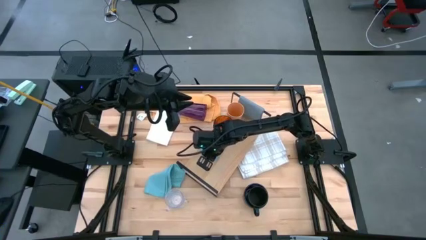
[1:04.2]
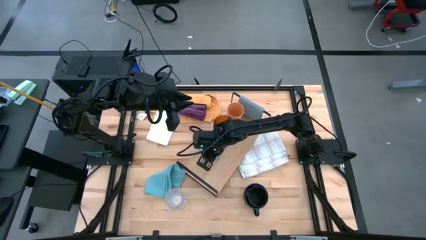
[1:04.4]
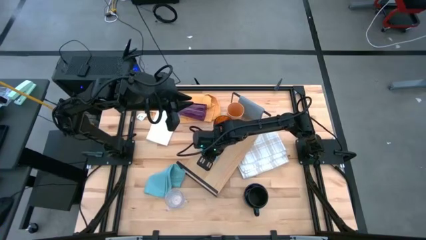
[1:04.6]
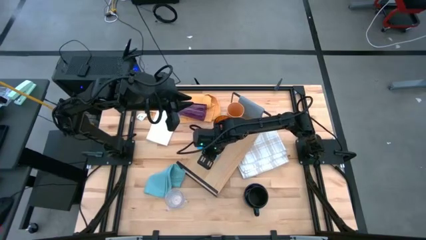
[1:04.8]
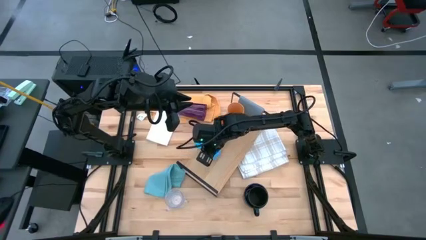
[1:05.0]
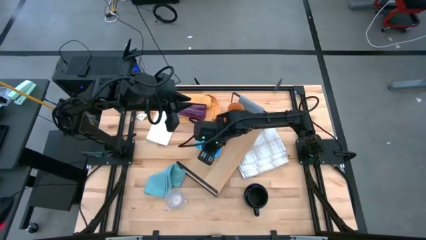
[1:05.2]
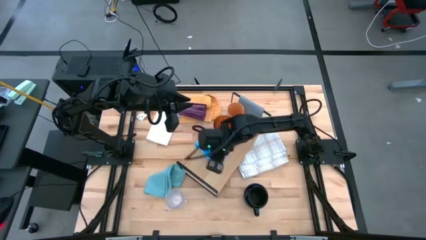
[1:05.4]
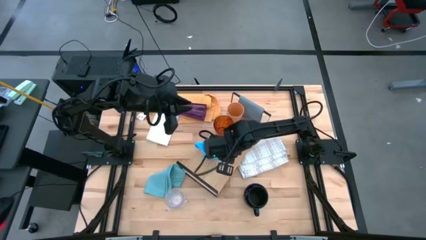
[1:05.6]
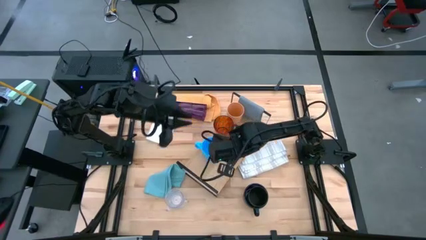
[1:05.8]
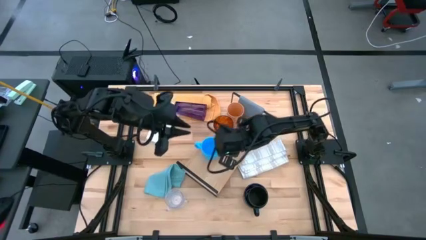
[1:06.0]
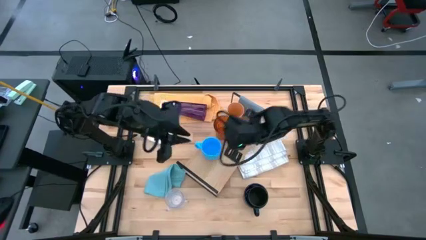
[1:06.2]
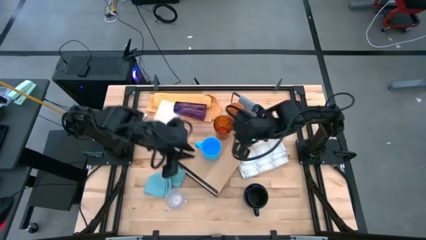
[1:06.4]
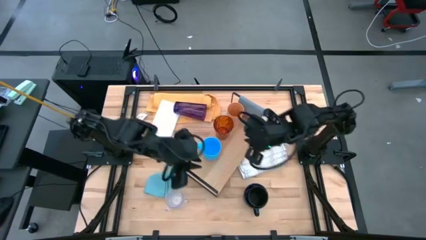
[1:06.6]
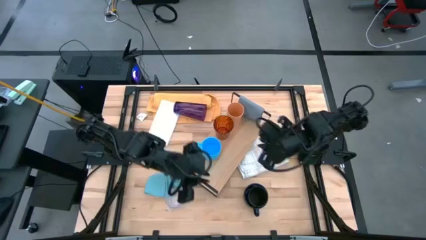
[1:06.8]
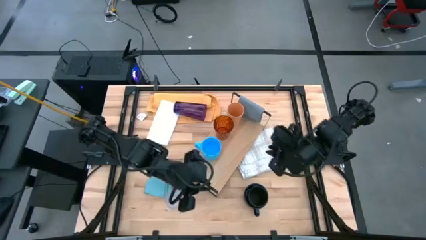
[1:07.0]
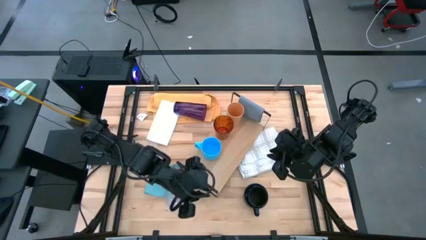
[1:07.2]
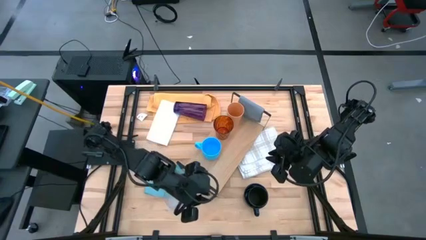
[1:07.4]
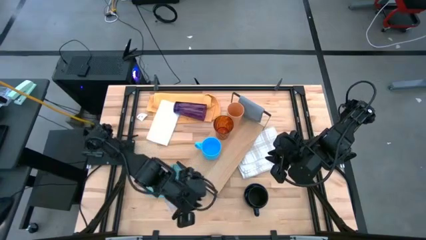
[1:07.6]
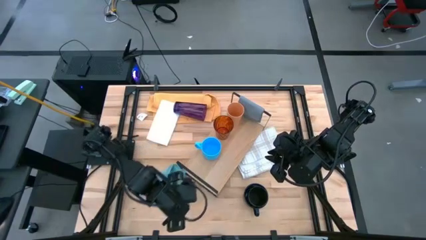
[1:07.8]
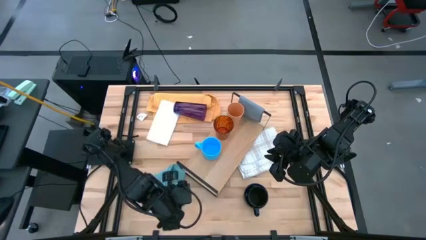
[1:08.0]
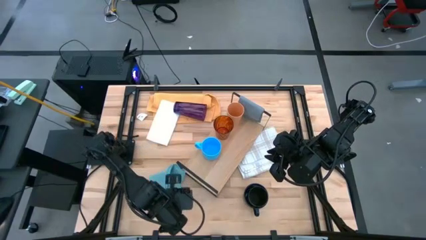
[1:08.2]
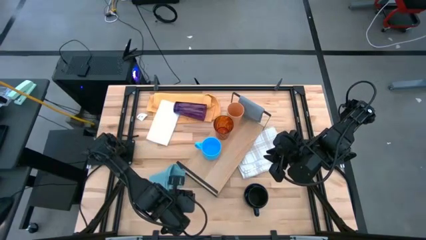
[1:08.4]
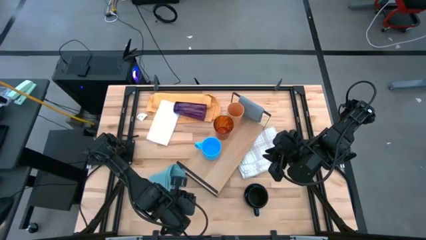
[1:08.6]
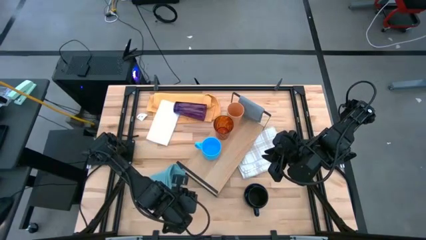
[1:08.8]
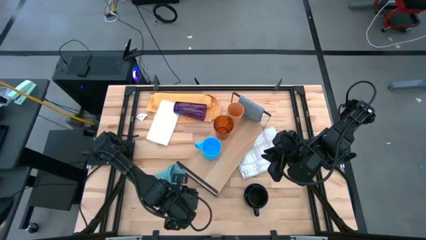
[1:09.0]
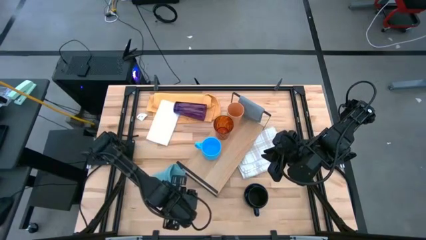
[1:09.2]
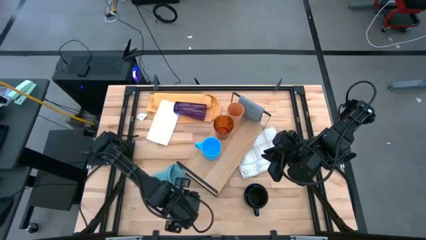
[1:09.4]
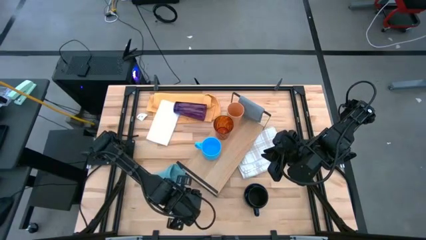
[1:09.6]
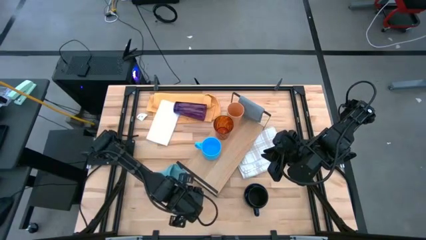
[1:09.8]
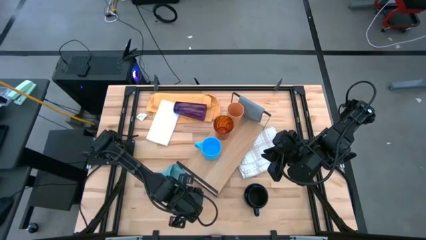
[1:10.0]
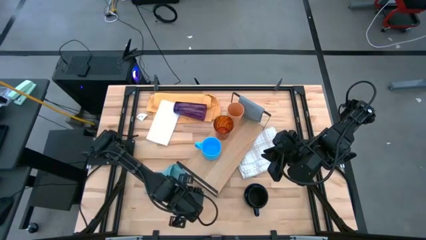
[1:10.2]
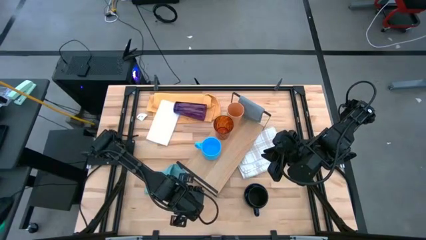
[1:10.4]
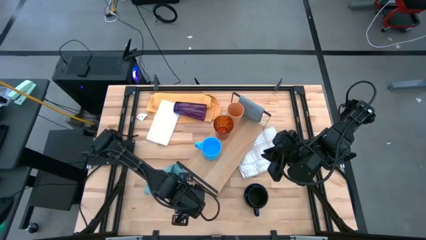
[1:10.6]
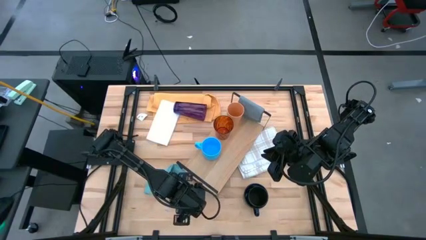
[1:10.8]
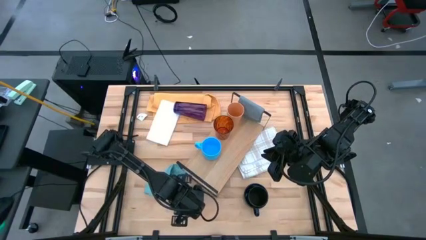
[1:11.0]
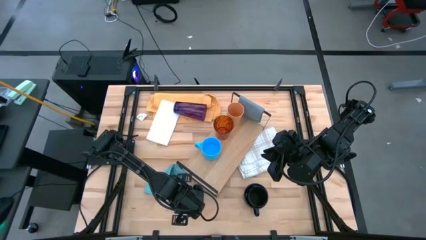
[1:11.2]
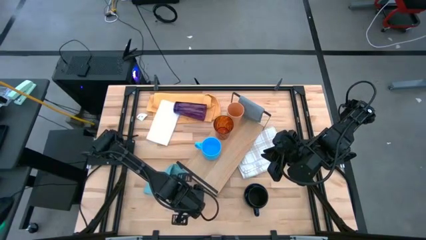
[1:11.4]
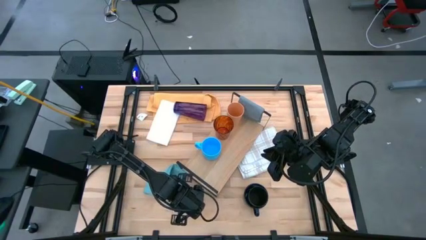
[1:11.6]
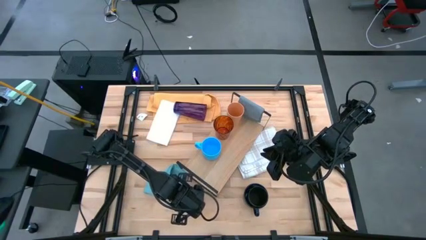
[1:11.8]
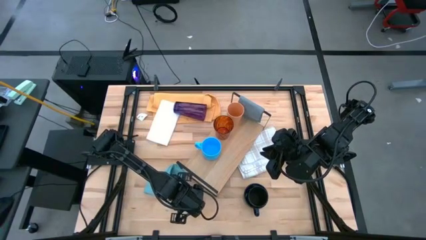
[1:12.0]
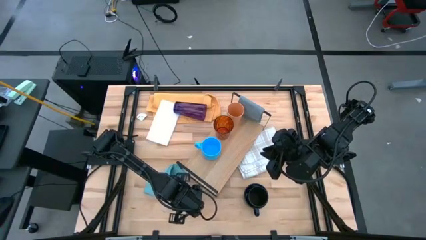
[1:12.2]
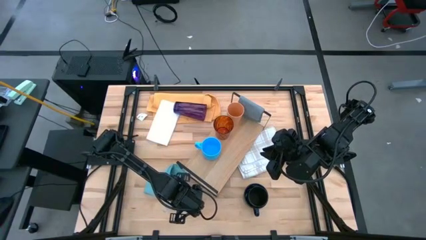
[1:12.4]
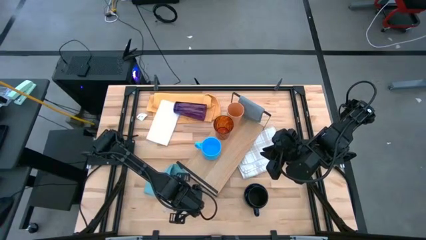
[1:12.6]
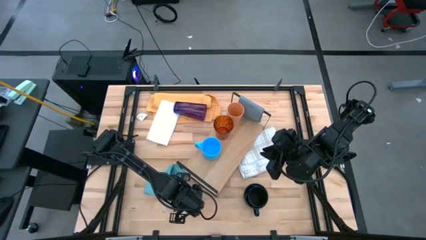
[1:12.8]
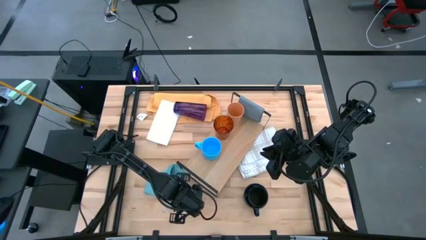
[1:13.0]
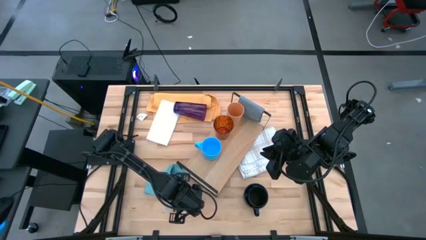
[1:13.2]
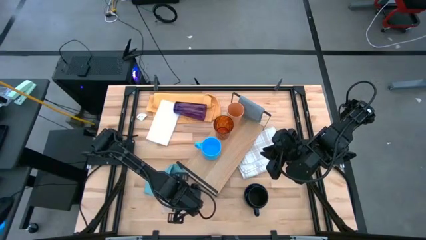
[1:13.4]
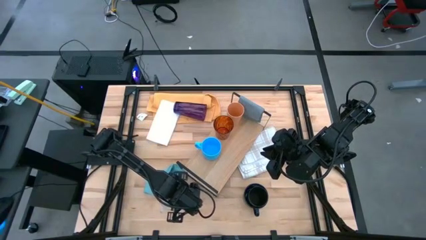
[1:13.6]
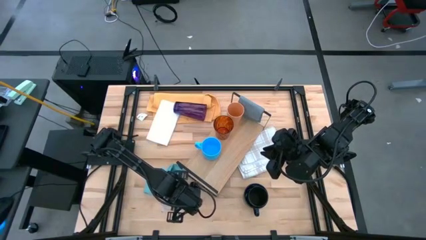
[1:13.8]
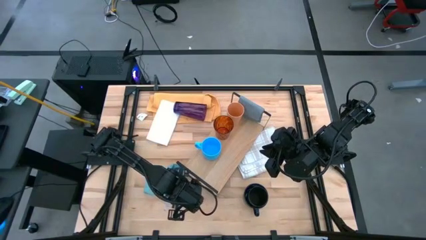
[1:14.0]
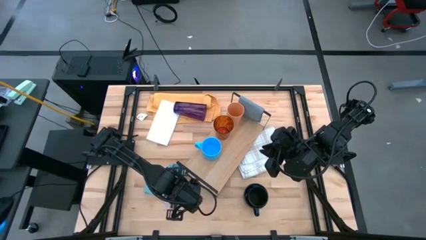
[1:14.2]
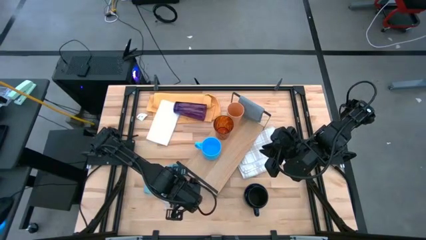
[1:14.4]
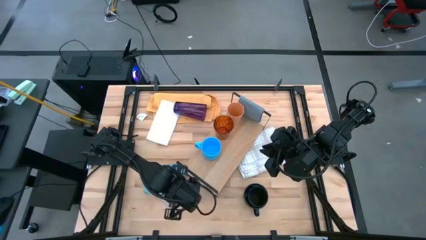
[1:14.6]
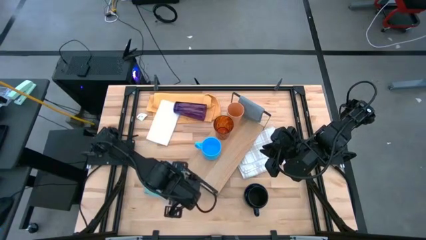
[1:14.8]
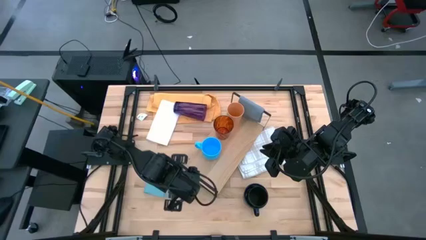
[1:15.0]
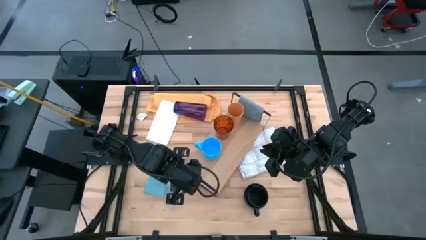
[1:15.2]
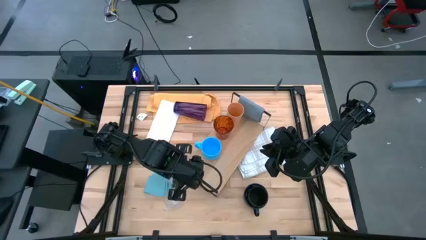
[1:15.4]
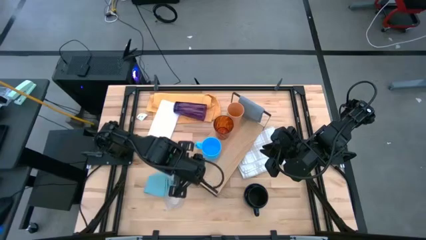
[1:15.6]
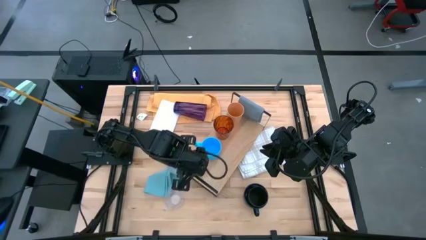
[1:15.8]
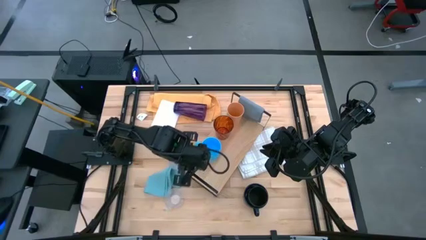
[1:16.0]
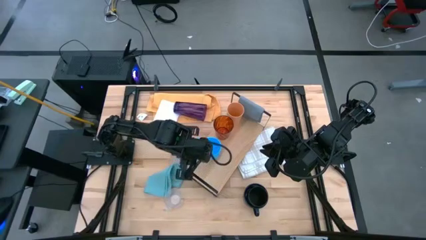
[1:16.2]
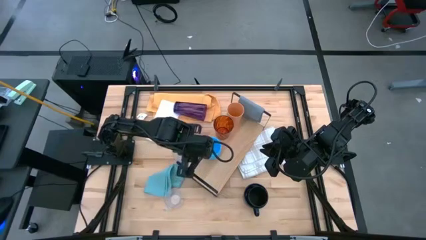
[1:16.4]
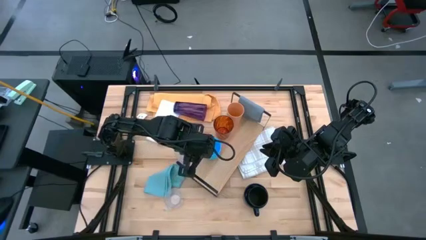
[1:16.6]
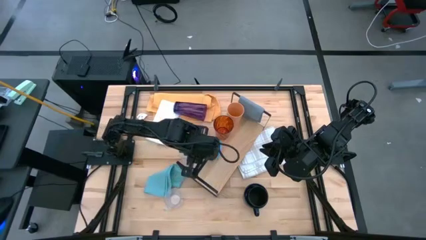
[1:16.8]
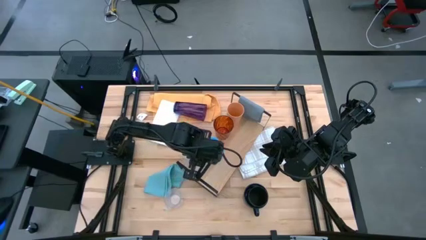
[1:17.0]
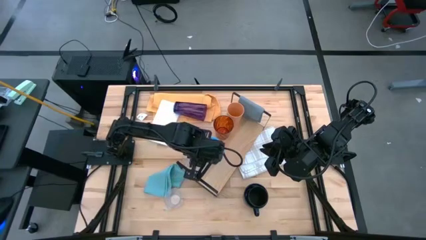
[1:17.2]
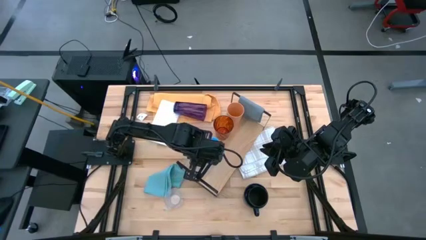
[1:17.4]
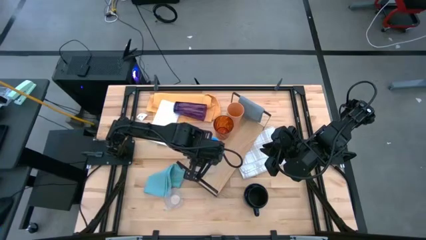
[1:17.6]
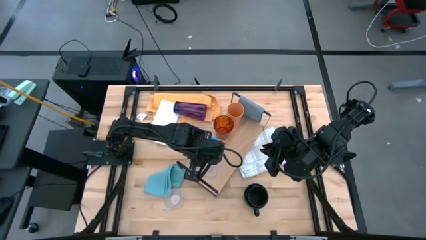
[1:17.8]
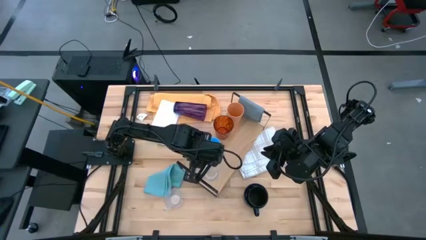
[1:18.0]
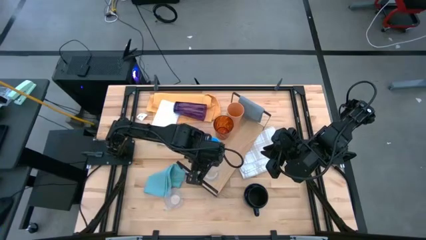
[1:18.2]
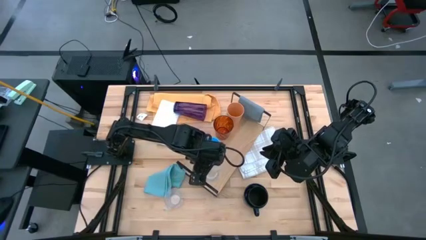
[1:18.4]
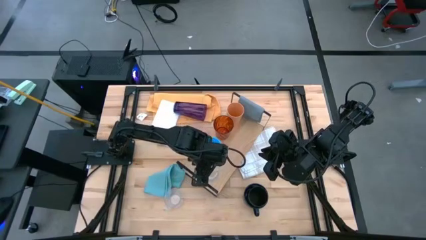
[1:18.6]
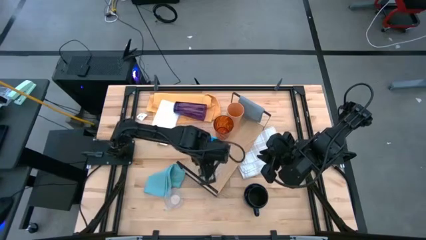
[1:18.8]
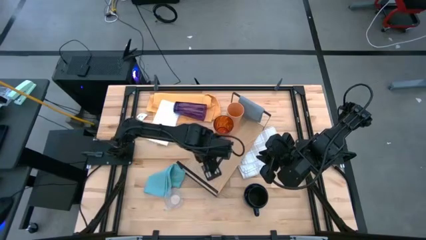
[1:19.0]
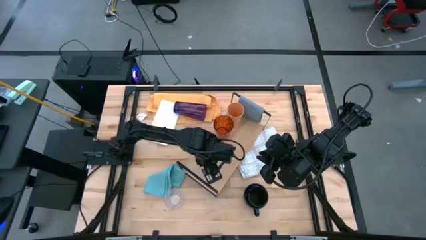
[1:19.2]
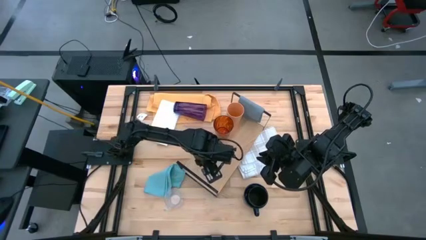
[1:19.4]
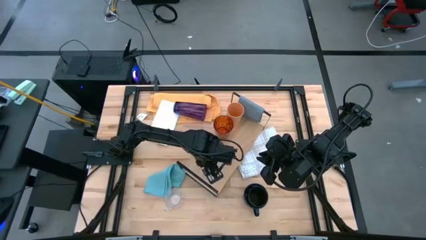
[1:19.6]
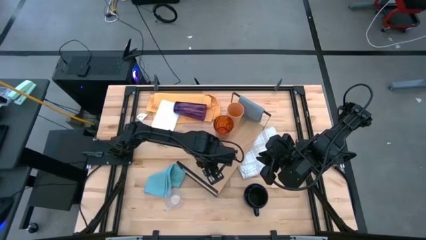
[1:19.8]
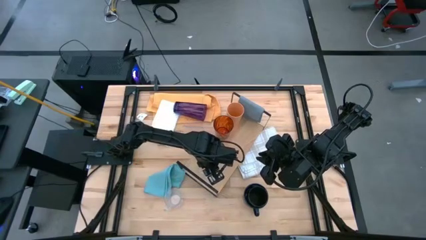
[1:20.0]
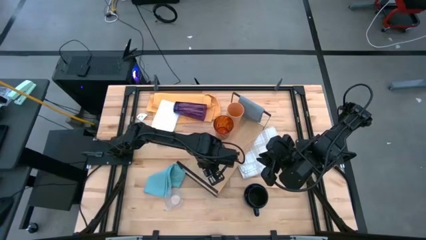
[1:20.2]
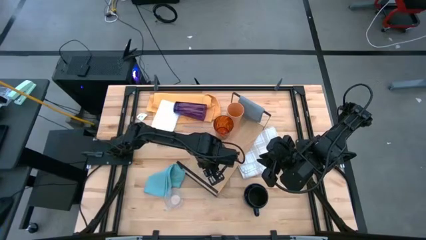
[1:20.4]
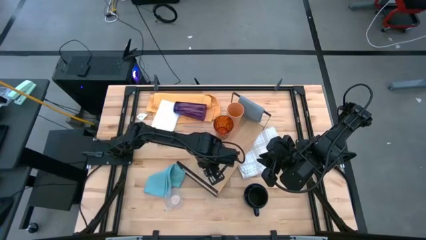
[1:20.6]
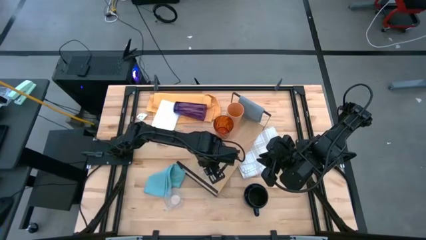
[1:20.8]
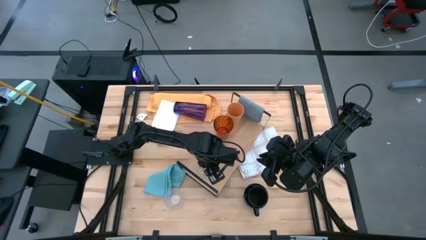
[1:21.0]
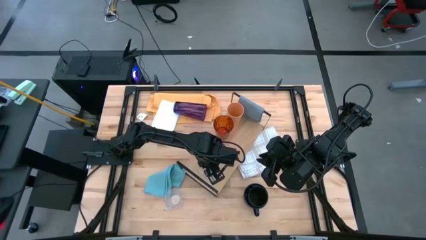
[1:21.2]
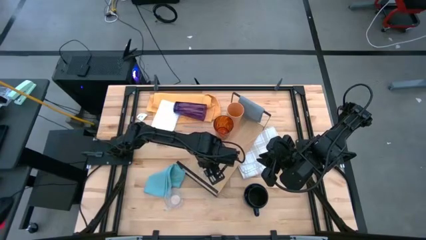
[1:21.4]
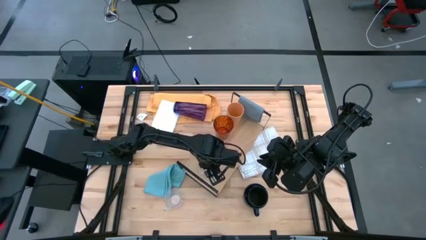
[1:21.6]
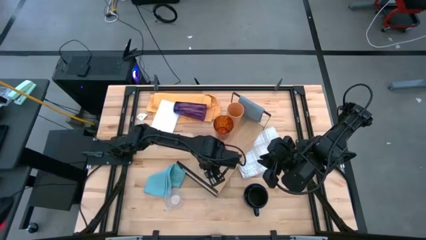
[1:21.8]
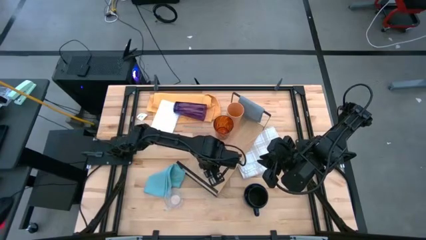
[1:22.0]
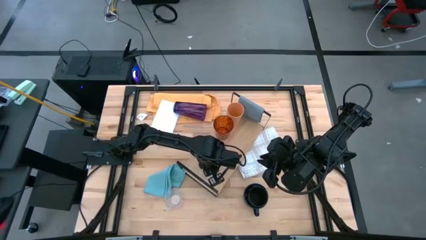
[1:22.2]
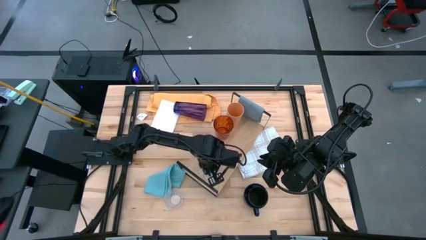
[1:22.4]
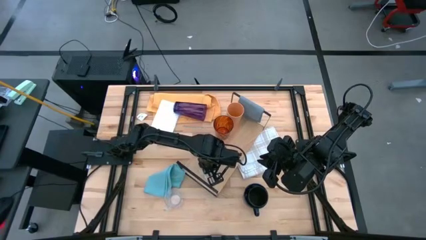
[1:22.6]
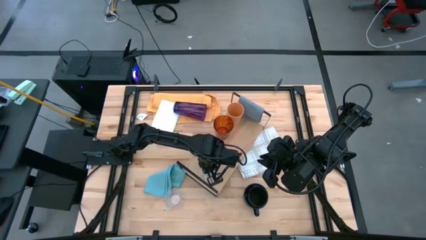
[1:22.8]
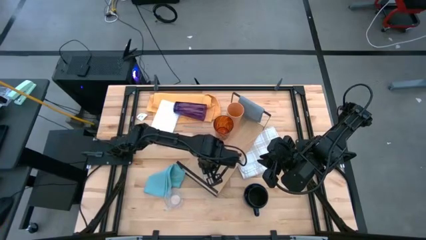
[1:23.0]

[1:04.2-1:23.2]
Task: Stack small to large cups/mugs on shelf
Put the transparent mug on the shelf
